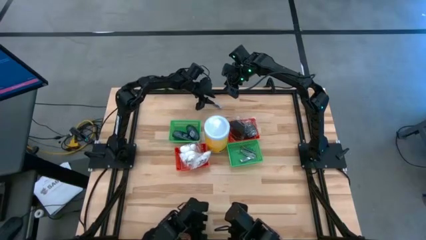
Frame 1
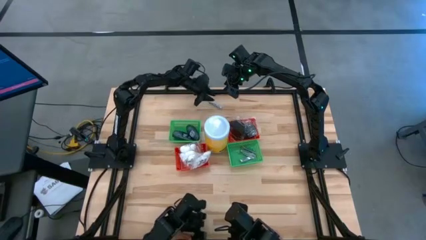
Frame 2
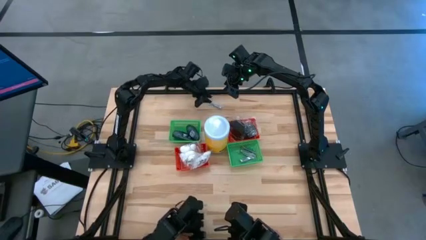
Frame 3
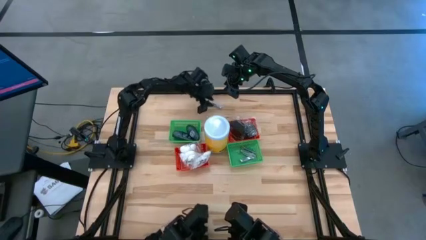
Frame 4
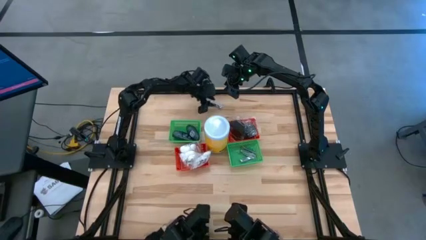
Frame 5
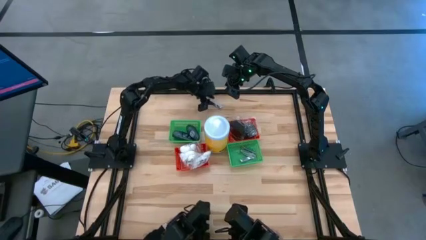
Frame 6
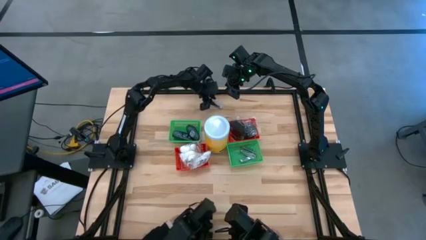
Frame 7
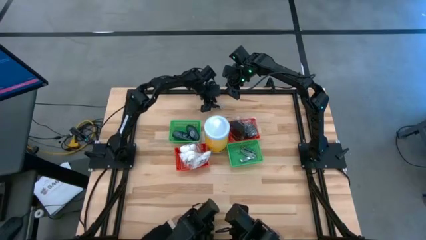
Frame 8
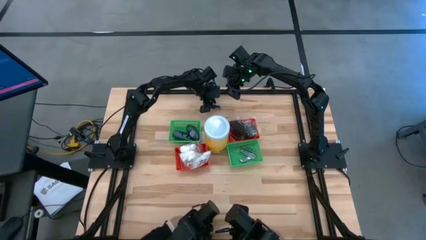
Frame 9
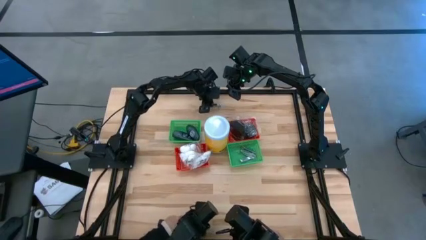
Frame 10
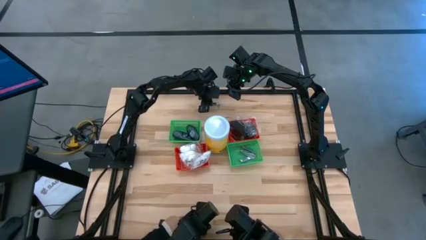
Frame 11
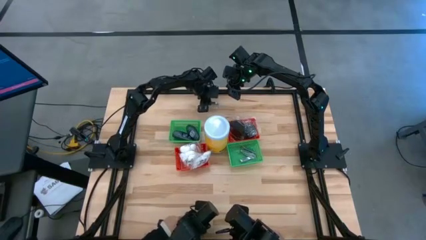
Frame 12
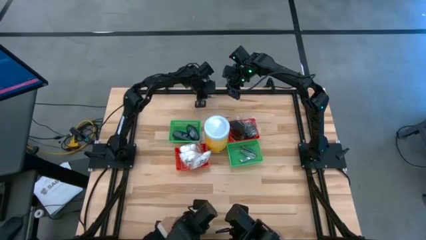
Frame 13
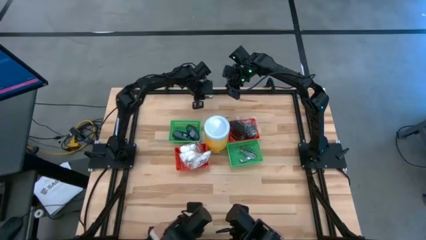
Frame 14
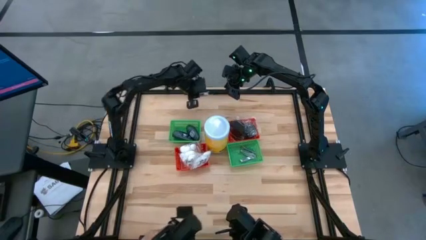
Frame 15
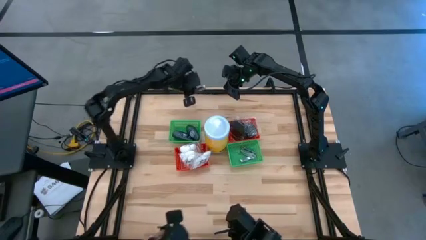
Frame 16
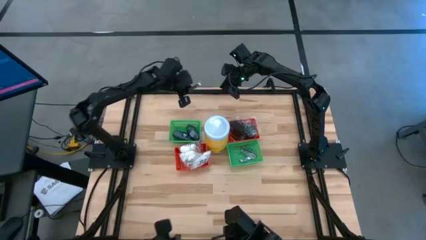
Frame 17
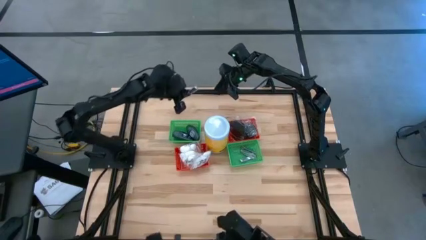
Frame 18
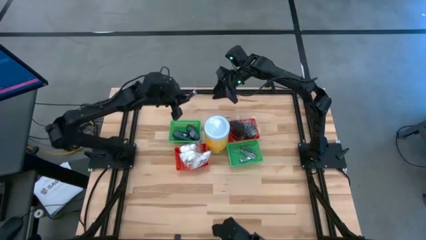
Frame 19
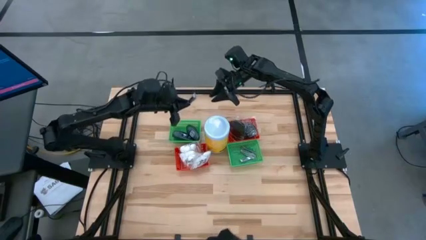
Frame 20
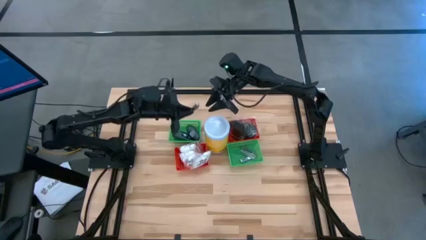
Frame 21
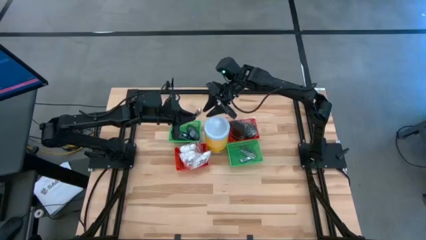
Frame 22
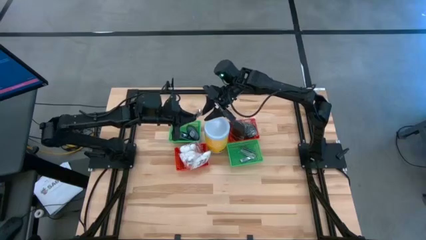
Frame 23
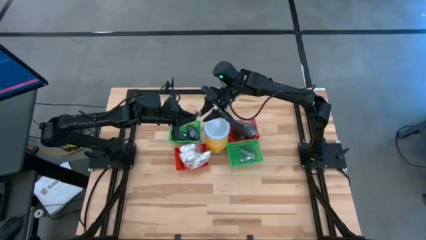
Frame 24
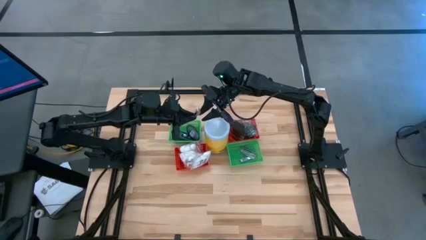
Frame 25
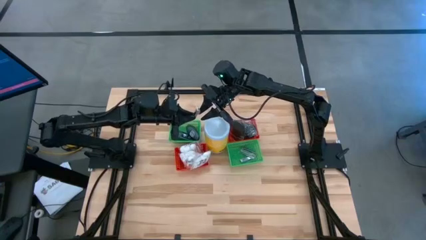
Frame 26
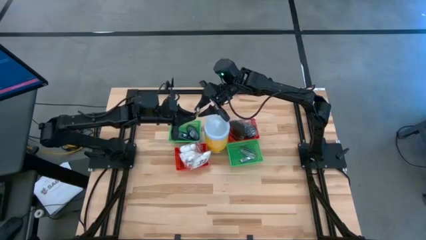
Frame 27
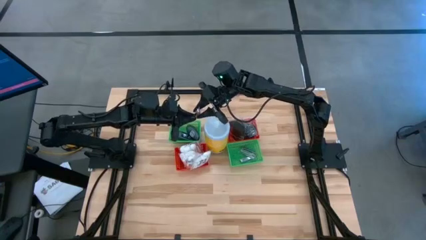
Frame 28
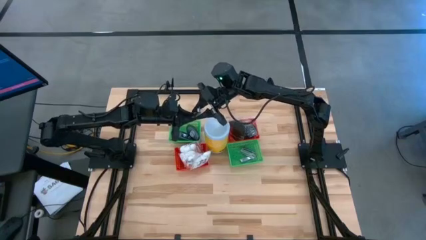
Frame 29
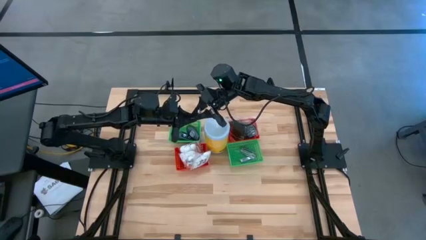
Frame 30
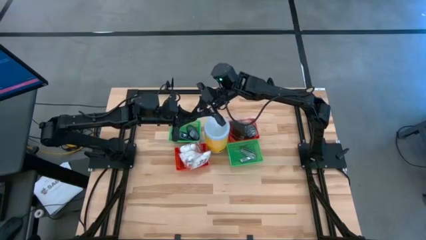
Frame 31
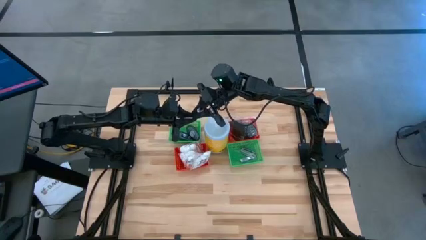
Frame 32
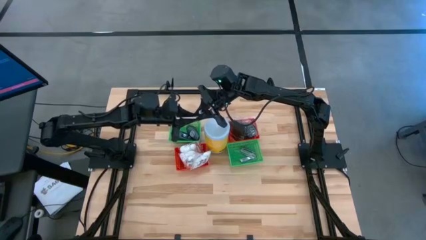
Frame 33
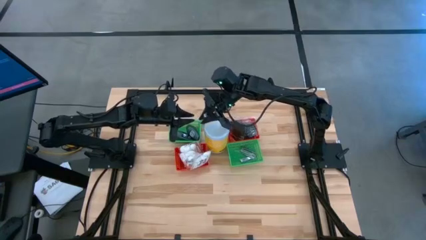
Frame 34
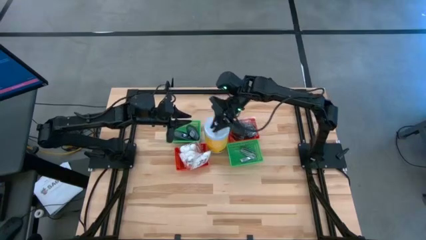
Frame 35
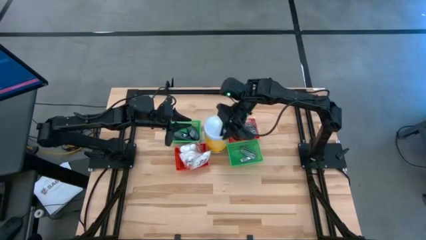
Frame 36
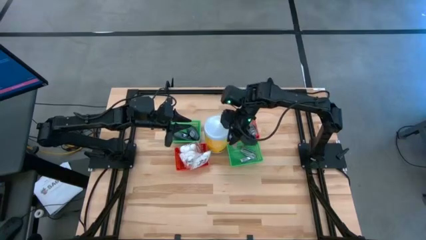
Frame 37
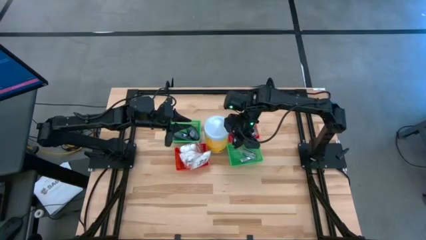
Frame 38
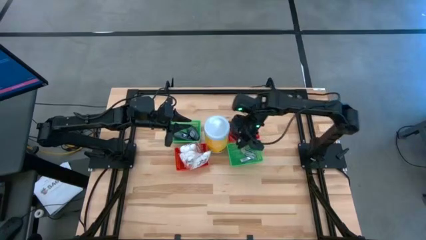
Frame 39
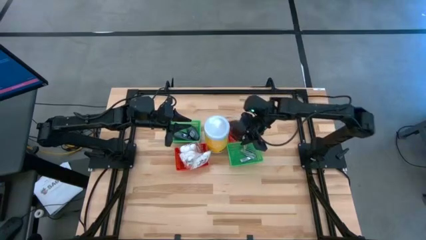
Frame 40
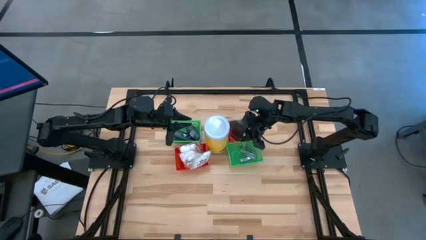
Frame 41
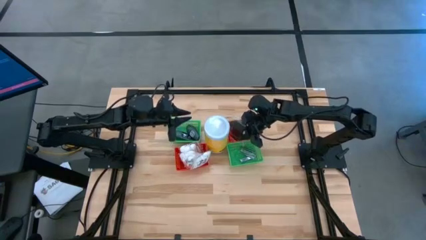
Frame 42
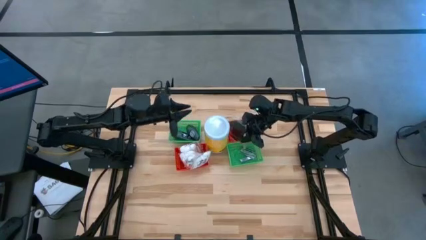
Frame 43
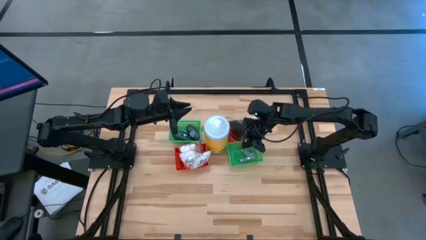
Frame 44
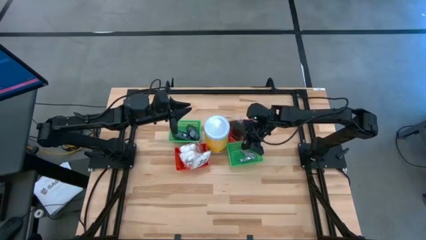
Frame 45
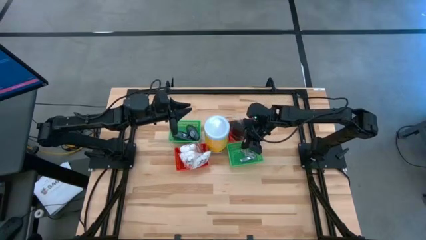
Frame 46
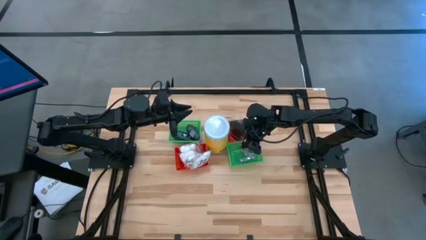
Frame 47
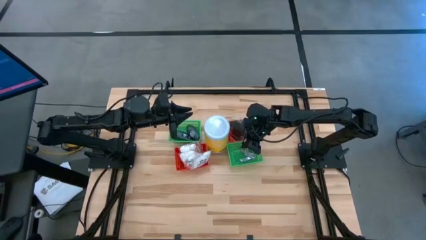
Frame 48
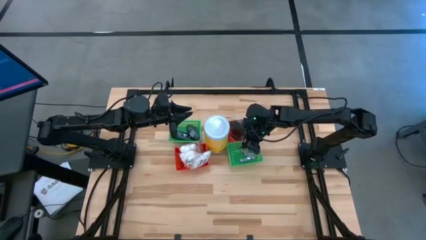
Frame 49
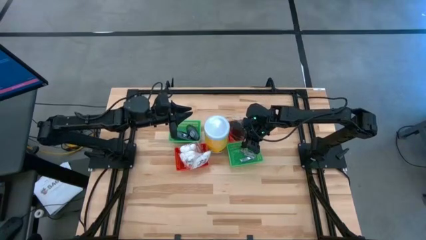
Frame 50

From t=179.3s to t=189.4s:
Task: Pick & Place Travel size toiletries
Put the silver nail cutter into the right green bin

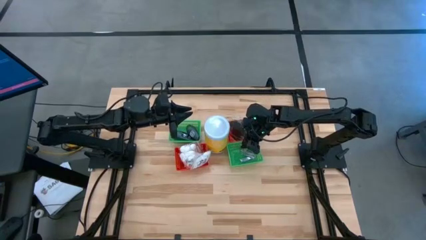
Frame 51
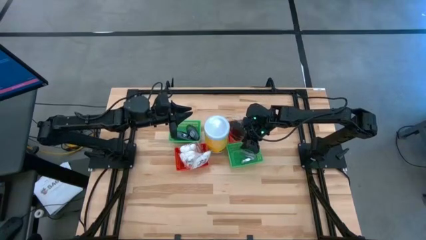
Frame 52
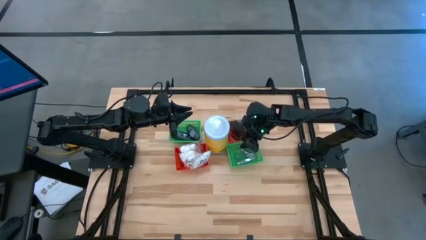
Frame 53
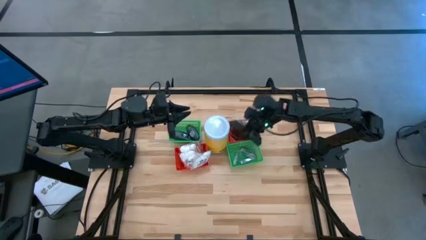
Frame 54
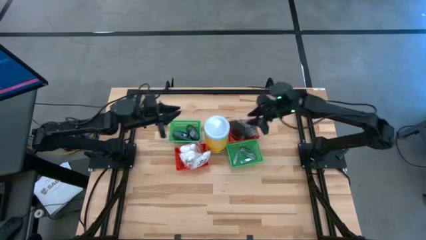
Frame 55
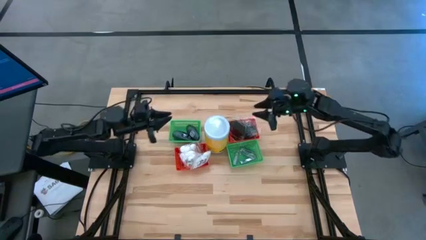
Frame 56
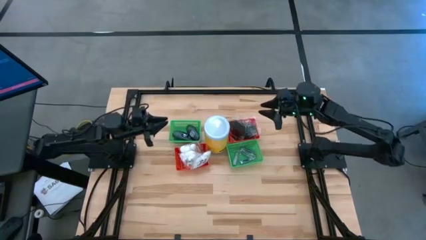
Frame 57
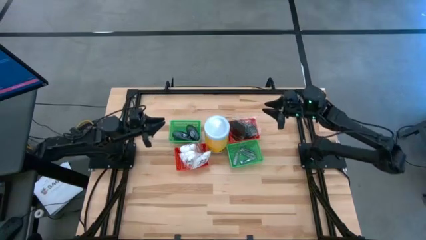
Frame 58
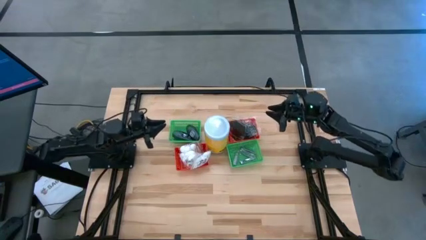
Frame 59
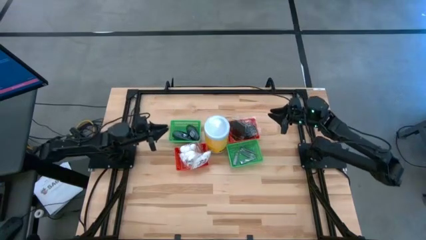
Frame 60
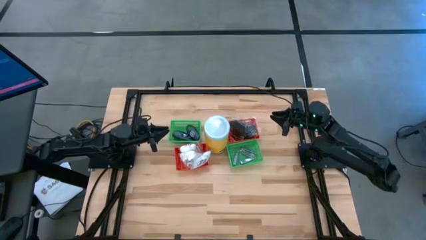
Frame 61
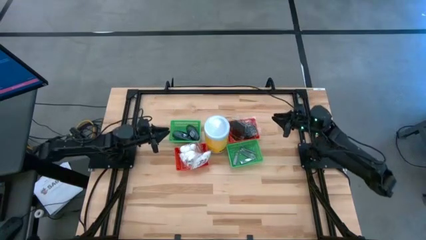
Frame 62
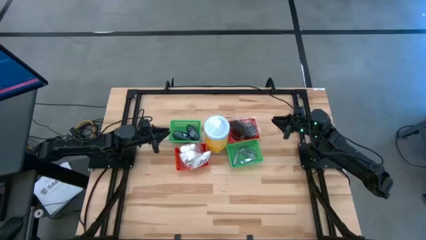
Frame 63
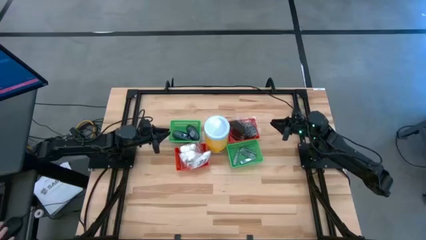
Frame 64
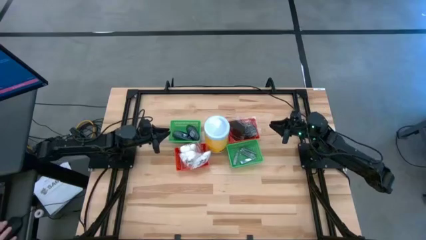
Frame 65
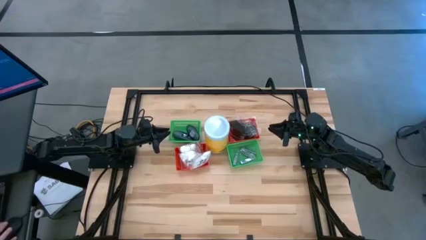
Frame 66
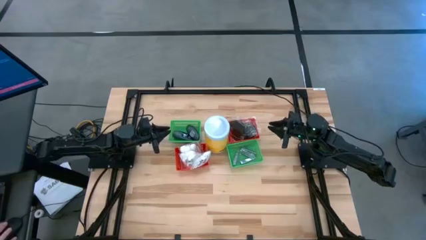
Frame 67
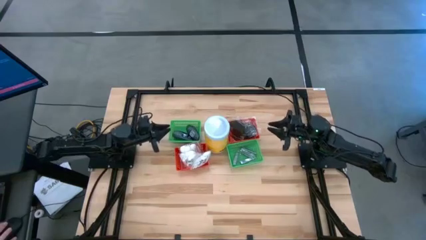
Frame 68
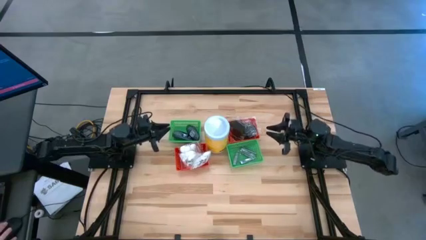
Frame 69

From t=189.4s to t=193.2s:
Return to Home Position
